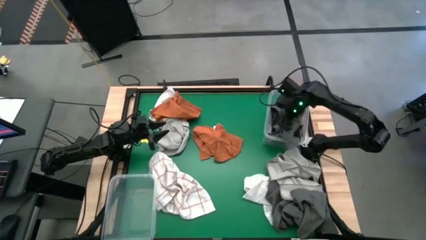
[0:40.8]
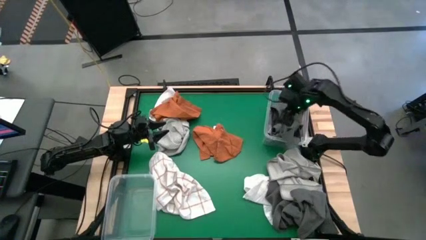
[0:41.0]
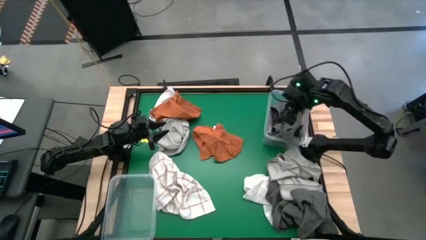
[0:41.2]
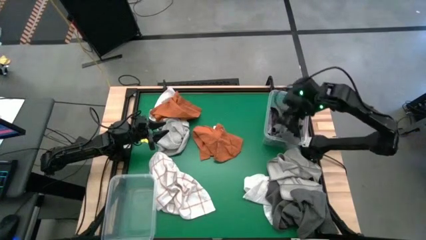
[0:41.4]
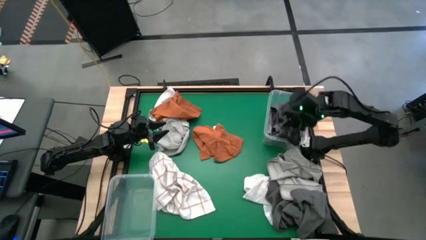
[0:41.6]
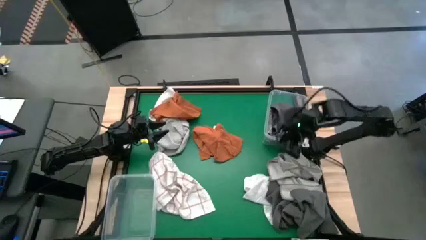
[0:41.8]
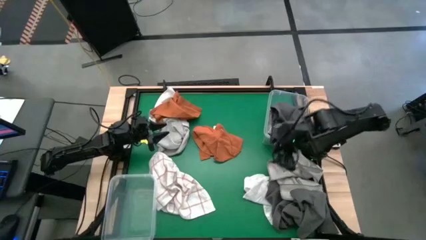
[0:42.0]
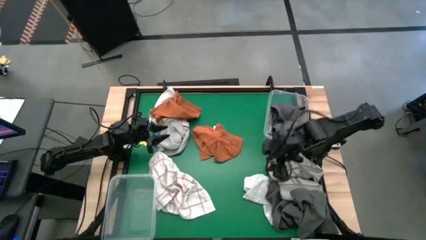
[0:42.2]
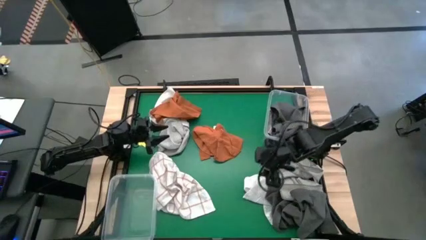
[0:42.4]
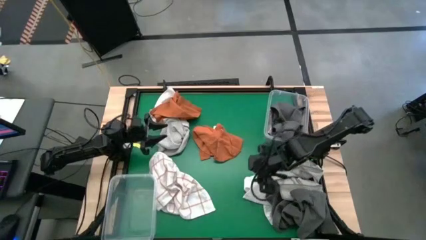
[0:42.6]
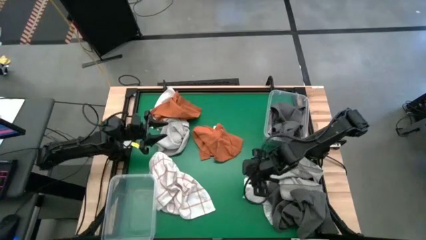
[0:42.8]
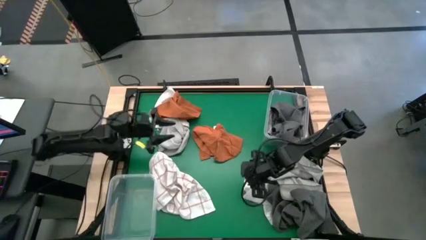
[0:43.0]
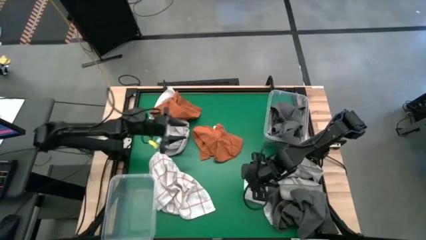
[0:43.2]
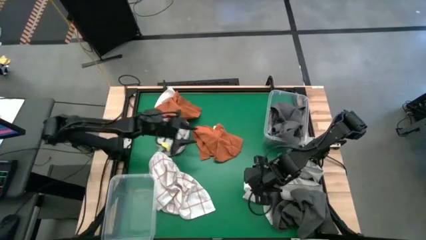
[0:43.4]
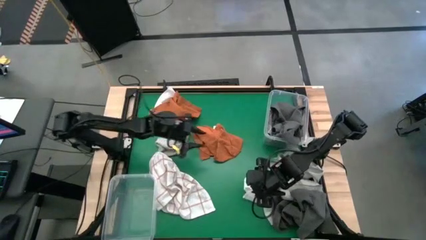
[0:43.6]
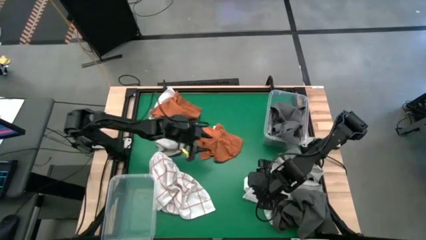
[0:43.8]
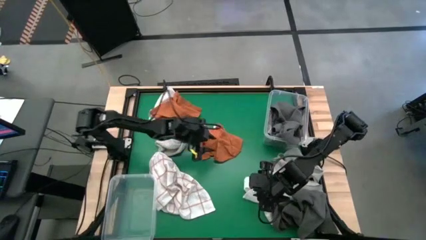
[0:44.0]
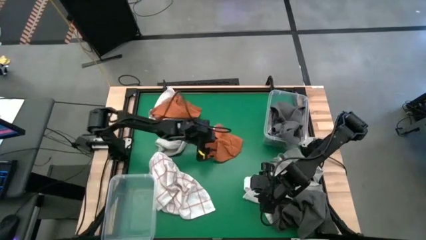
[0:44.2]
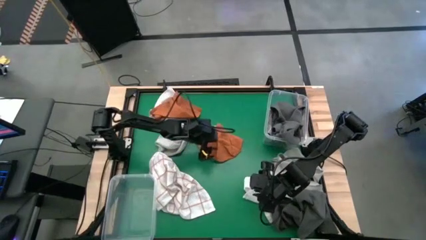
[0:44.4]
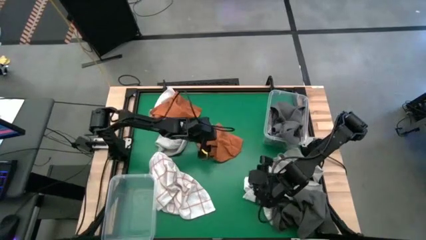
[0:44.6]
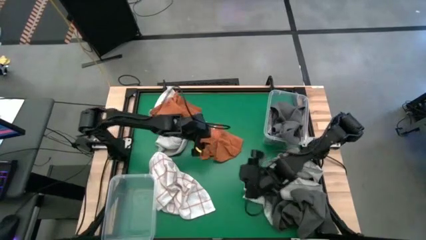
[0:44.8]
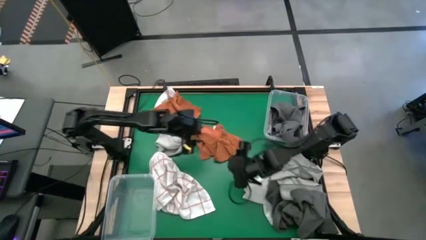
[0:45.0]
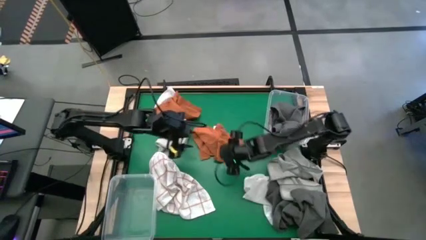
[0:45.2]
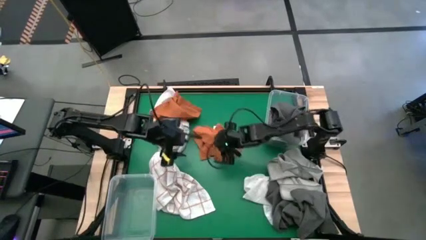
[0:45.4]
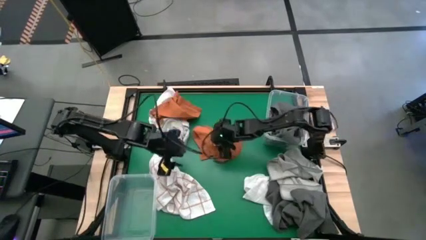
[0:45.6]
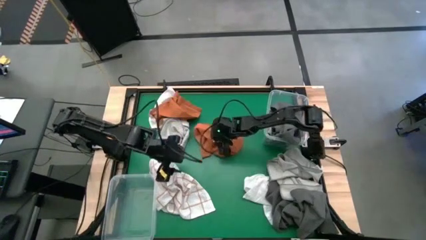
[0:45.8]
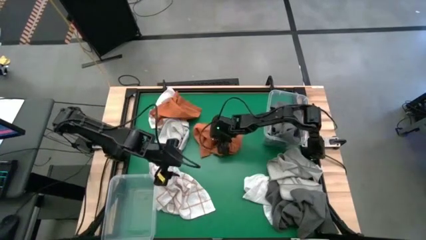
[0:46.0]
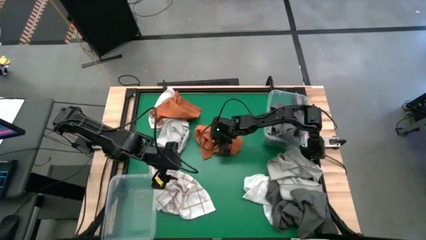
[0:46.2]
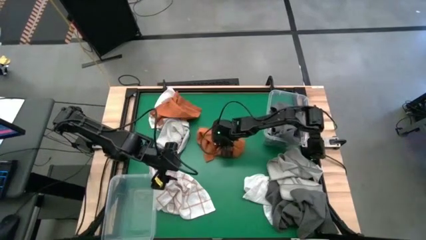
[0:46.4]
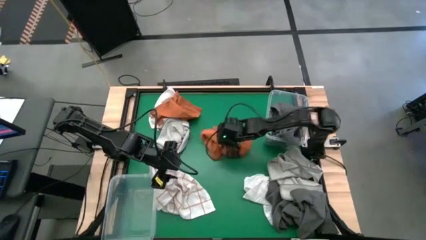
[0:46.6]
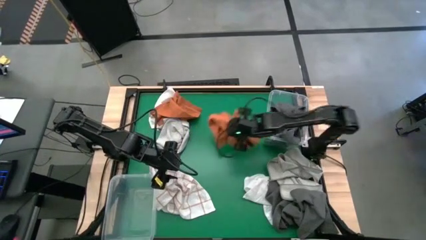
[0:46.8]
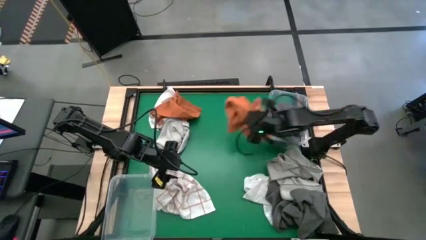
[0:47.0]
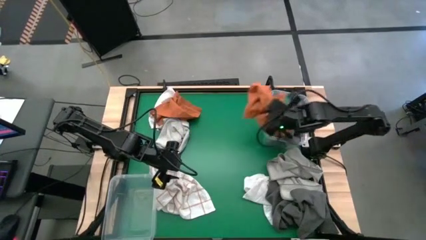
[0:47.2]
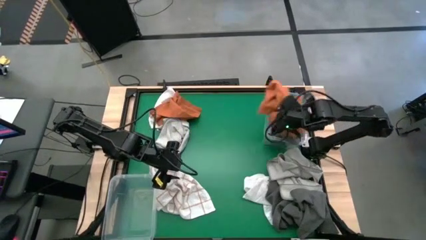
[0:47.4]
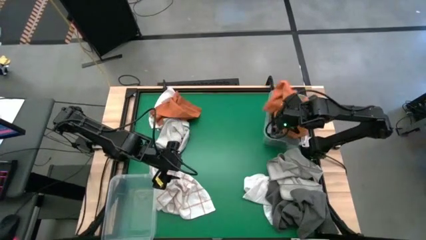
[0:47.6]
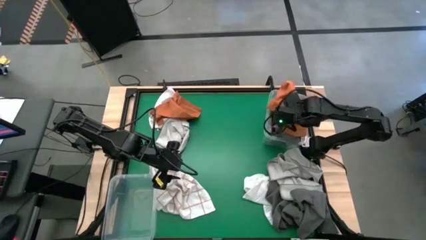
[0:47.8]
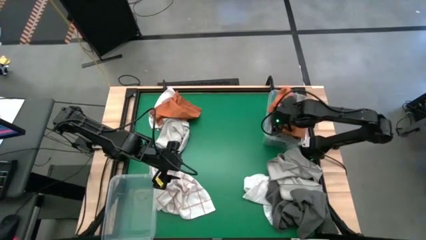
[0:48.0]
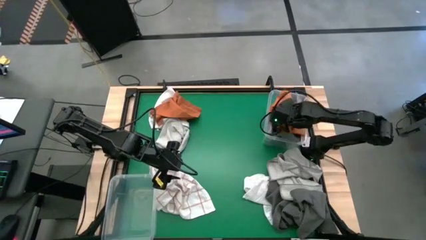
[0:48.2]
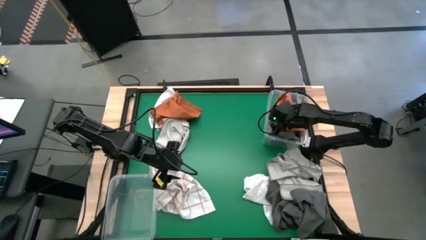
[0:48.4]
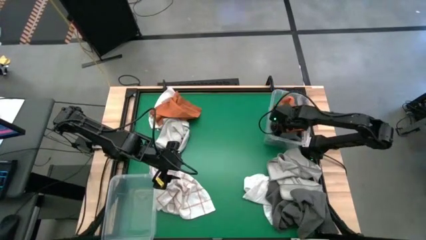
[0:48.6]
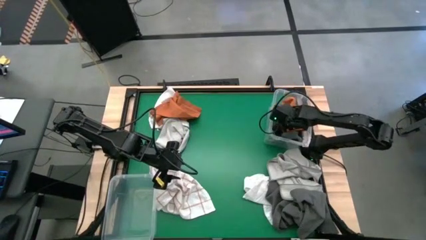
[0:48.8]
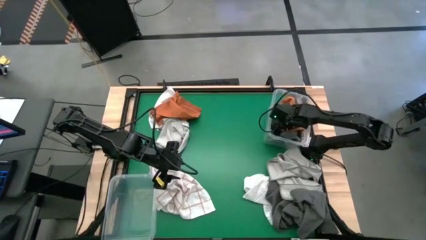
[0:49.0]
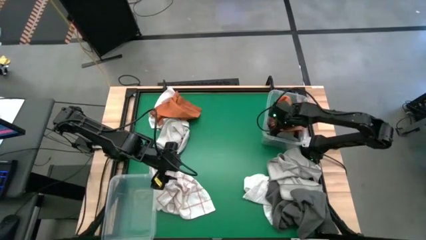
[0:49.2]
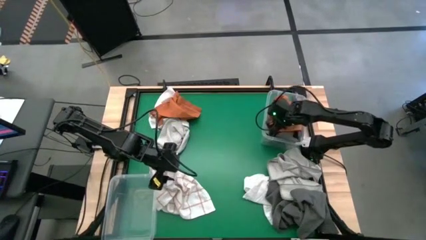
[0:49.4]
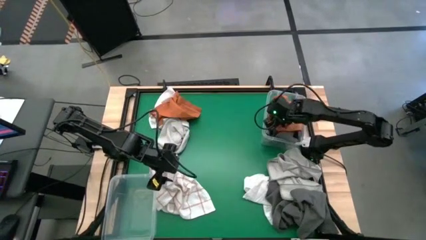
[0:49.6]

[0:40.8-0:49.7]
Task: Sort towels by color in basket
Put the orange microfiber towel into the top transparent bin

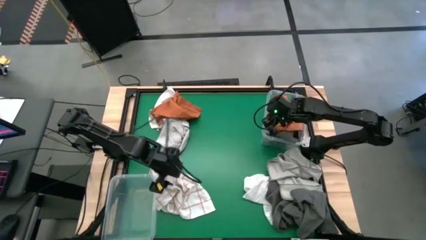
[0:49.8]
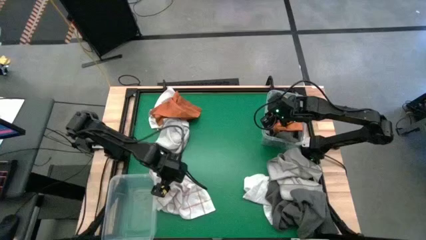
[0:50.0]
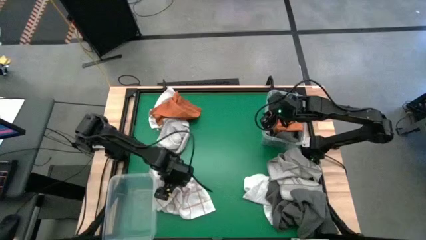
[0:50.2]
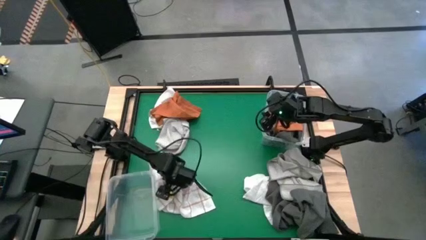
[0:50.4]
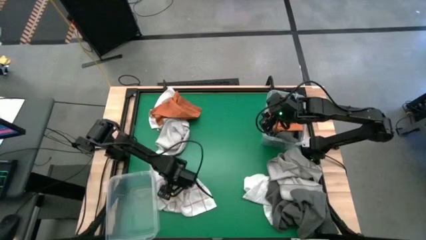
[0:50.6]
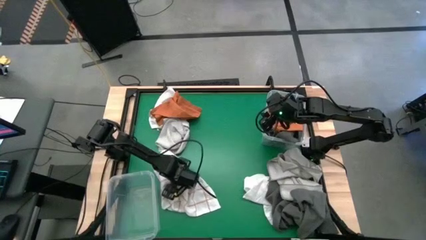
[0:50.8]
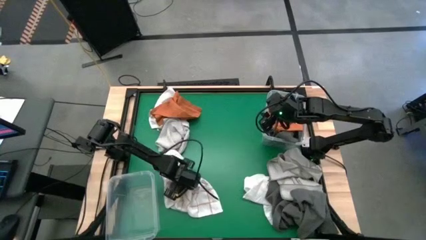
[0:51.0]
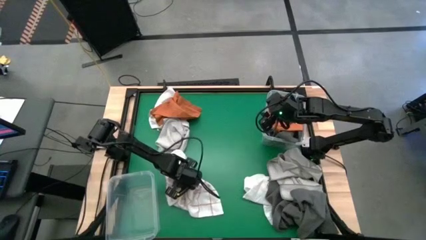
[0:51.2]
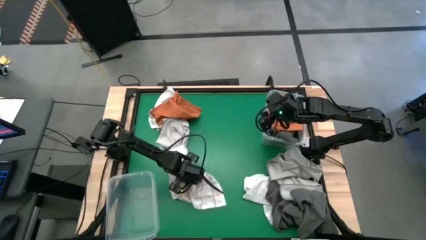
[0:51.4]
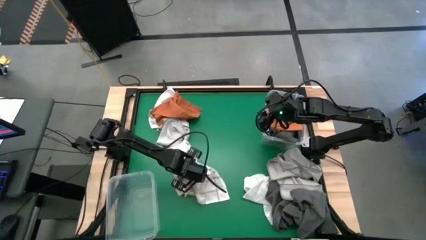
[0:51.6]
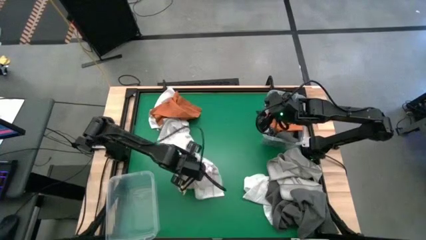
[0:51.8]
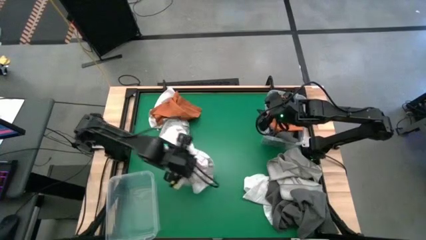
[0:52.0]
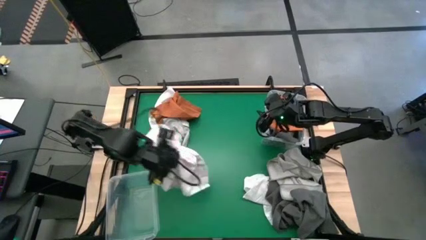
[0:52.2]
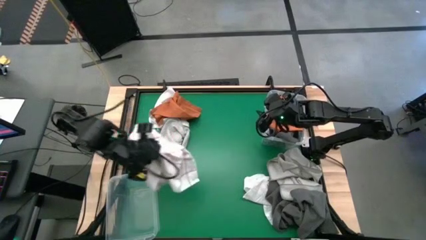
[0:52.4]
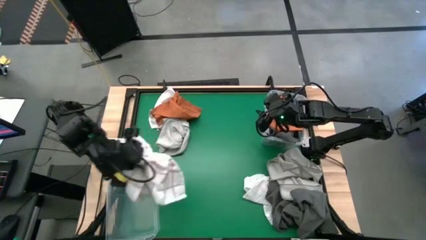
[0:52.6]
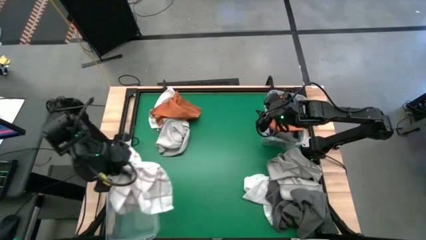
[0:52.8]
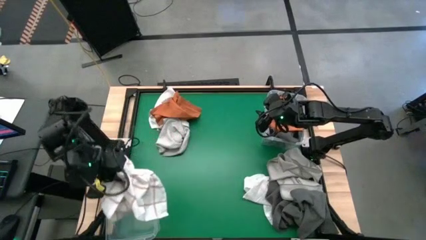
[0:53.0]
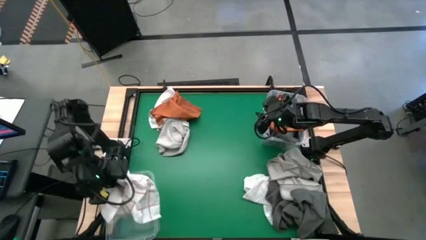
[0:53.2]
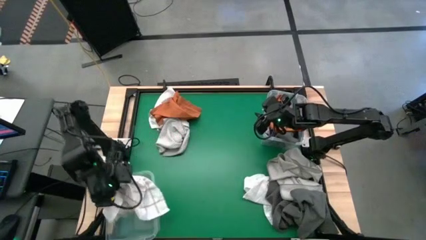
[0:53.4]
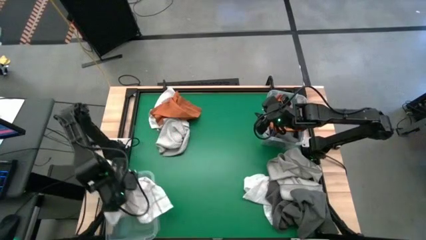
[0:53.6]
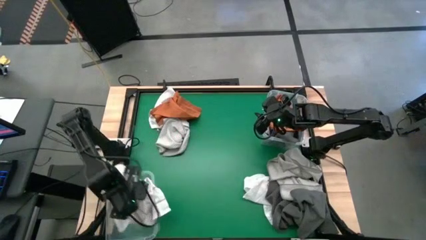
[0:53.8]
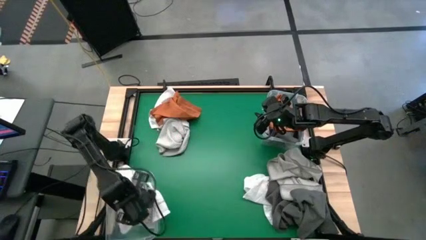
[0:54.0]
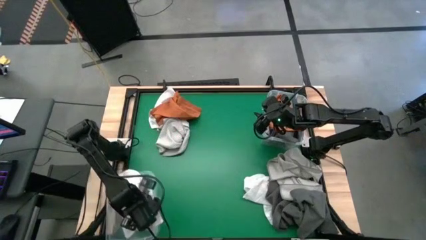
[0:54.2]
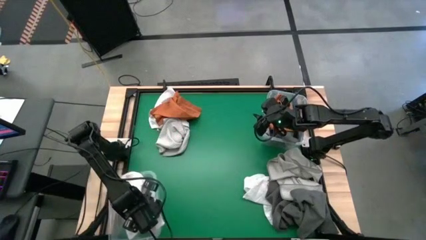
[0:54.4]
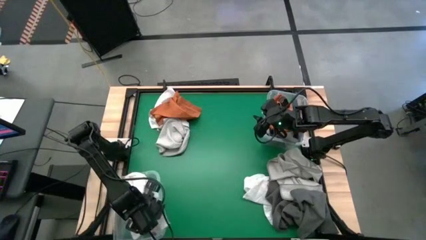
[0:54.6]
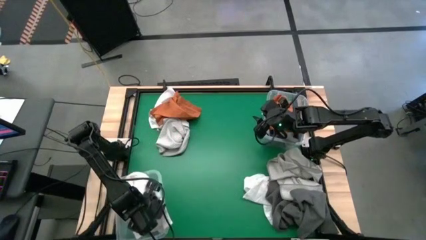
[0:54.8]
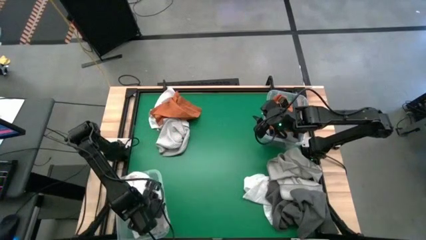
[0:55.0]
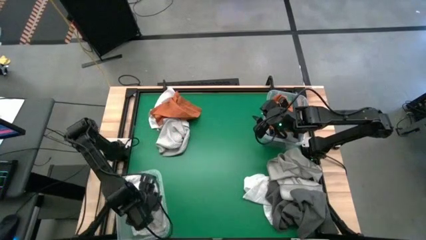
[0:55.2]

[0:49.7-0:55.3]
Put the white striped microfiber towel into the bottom transparent bin
